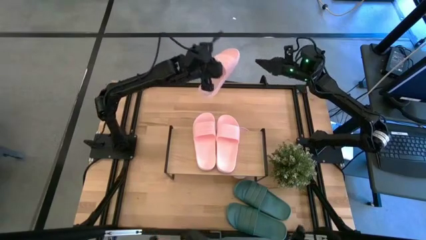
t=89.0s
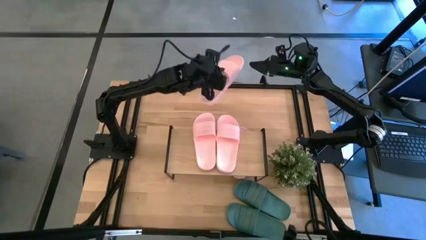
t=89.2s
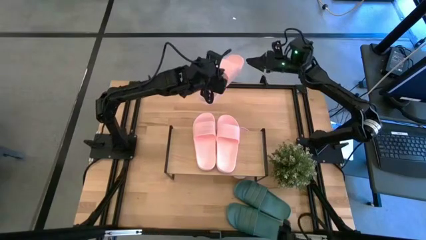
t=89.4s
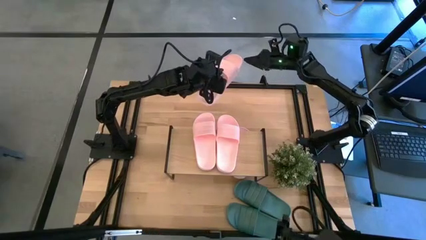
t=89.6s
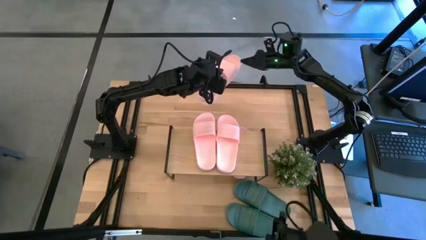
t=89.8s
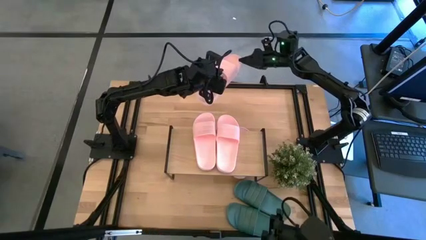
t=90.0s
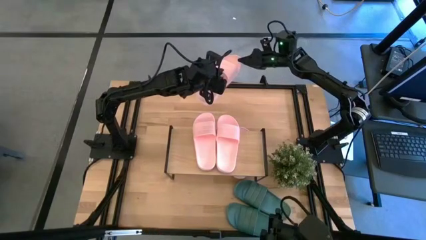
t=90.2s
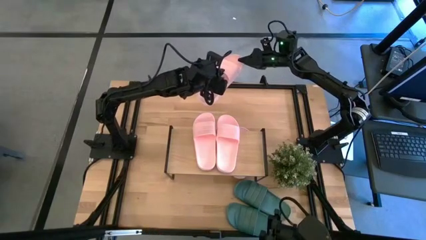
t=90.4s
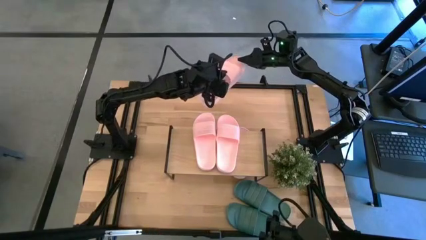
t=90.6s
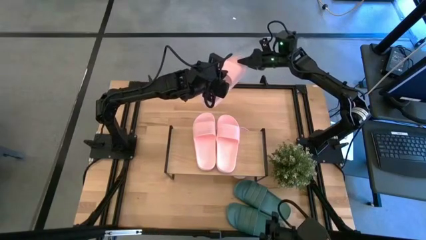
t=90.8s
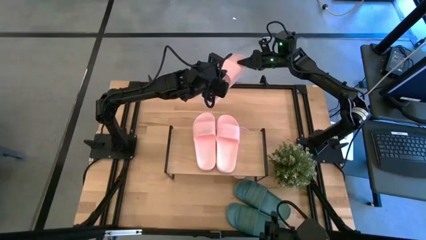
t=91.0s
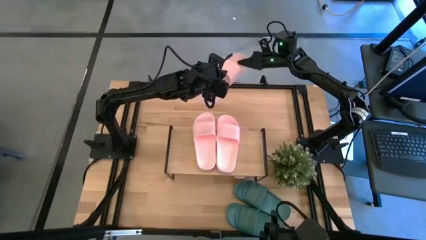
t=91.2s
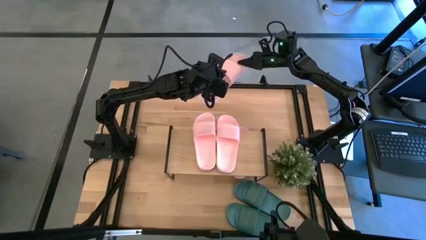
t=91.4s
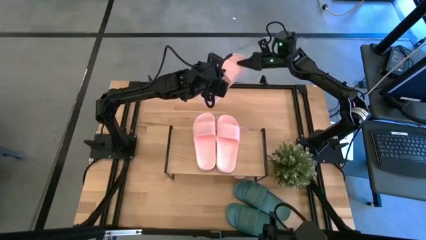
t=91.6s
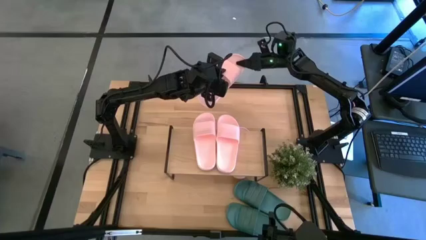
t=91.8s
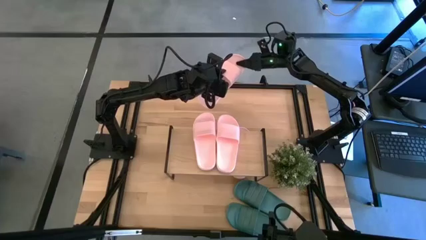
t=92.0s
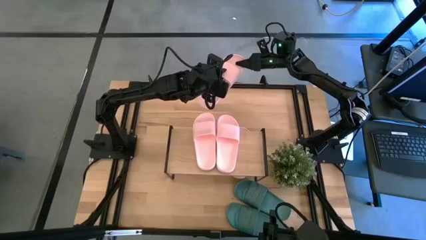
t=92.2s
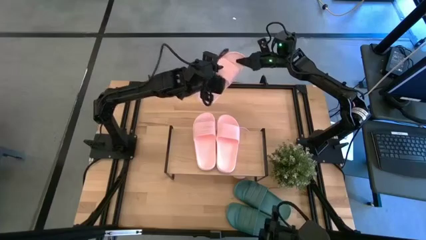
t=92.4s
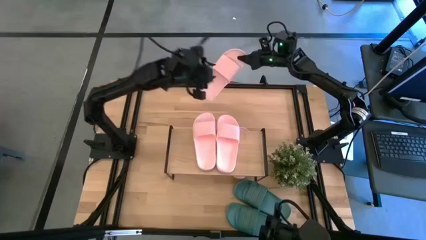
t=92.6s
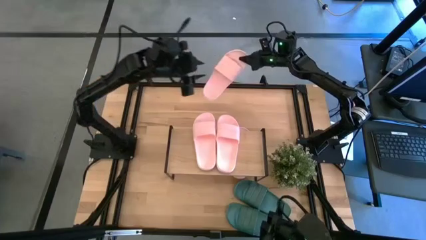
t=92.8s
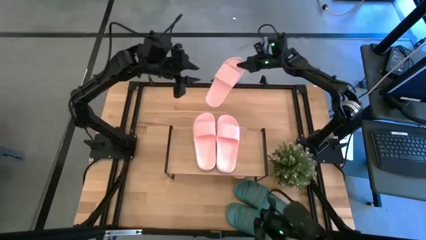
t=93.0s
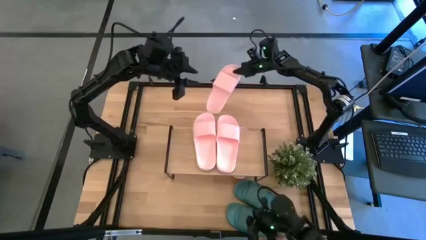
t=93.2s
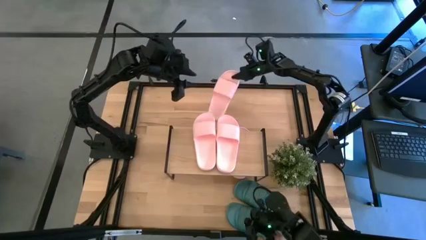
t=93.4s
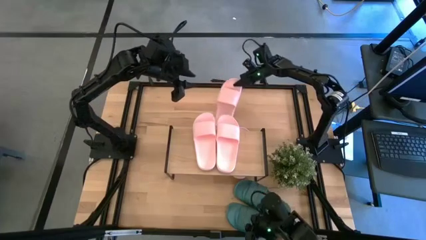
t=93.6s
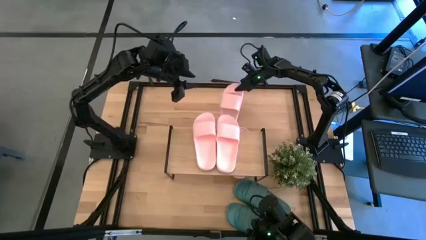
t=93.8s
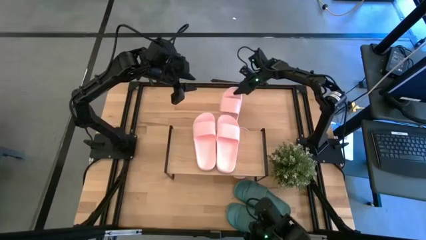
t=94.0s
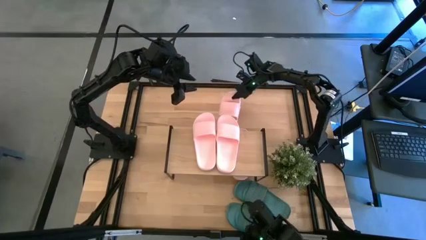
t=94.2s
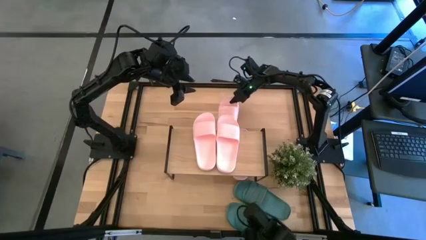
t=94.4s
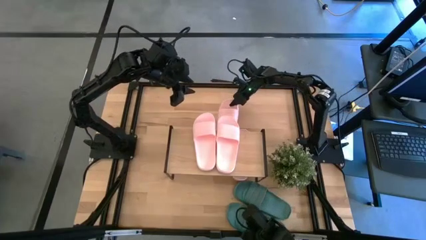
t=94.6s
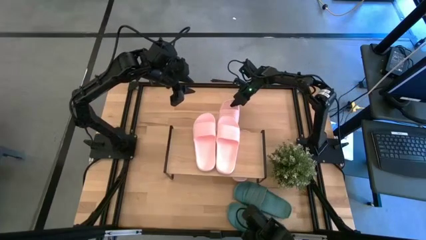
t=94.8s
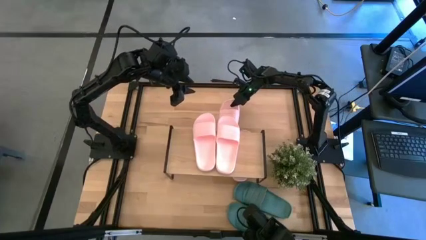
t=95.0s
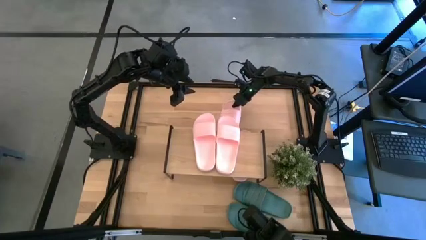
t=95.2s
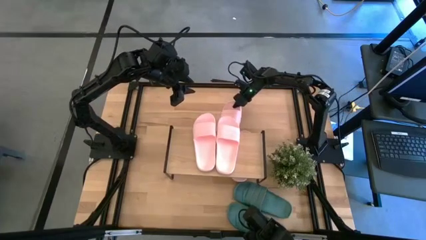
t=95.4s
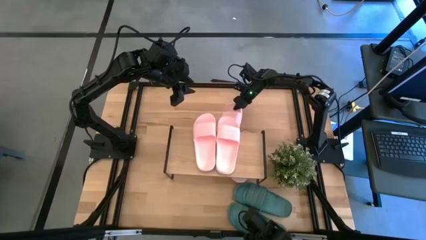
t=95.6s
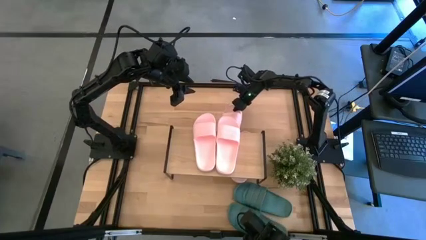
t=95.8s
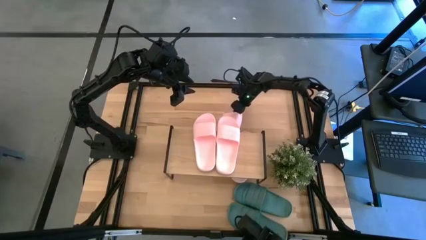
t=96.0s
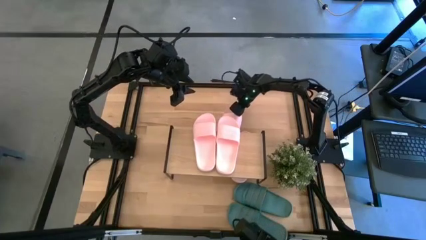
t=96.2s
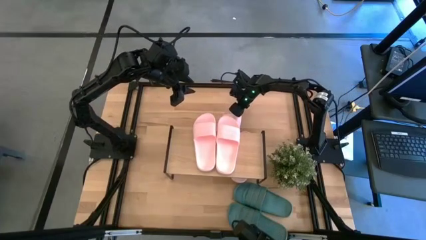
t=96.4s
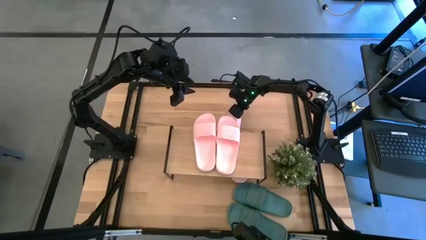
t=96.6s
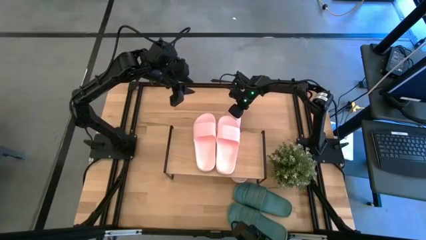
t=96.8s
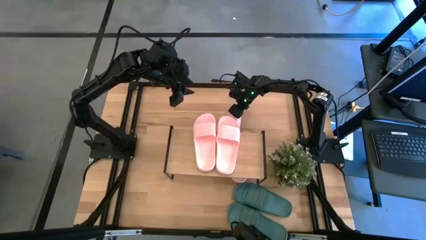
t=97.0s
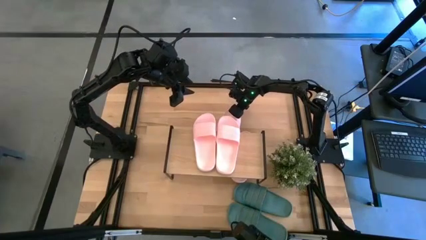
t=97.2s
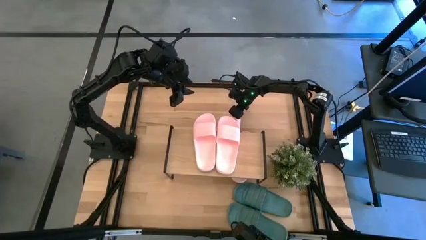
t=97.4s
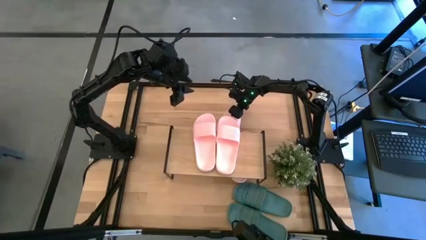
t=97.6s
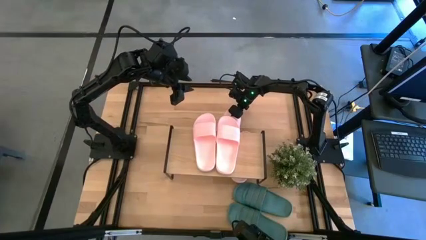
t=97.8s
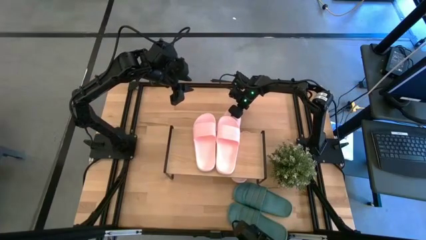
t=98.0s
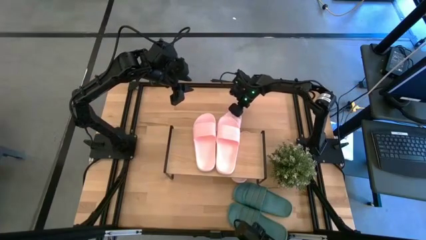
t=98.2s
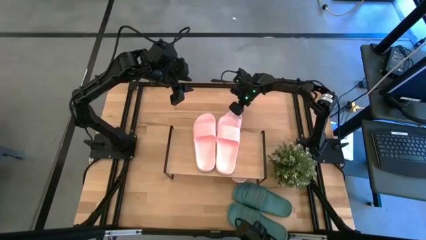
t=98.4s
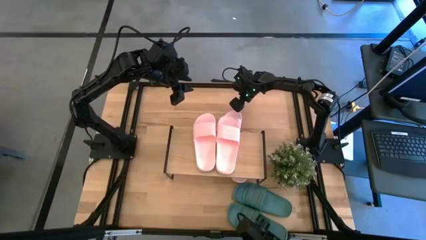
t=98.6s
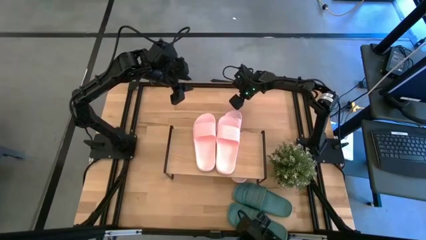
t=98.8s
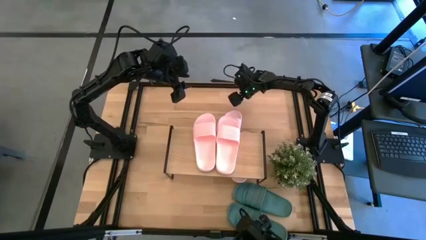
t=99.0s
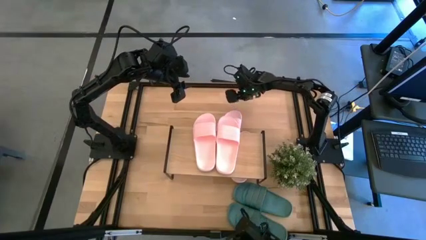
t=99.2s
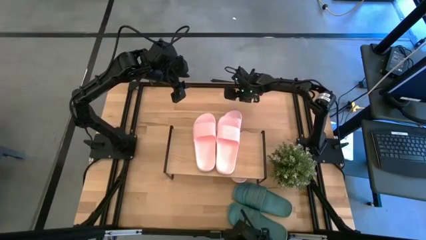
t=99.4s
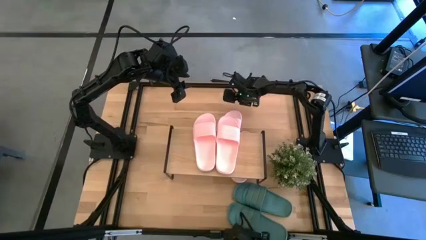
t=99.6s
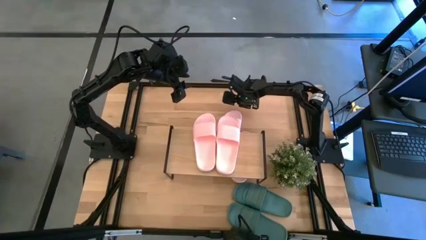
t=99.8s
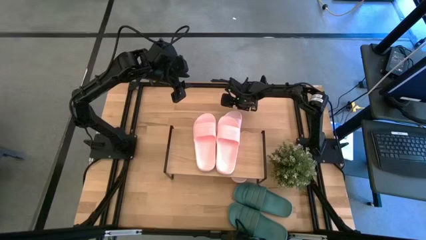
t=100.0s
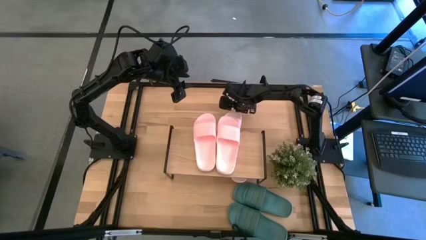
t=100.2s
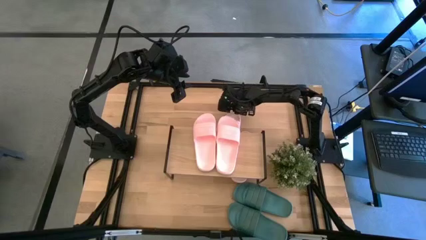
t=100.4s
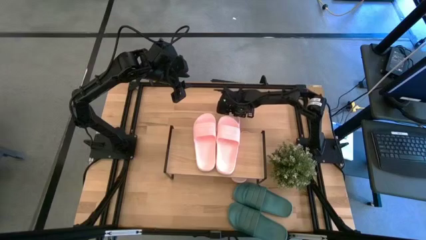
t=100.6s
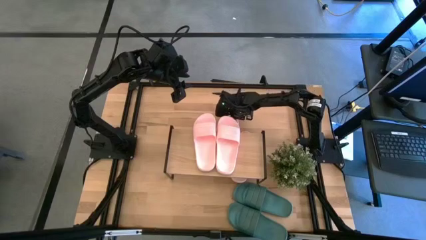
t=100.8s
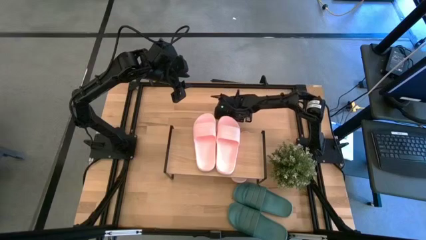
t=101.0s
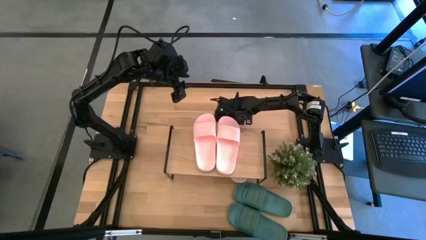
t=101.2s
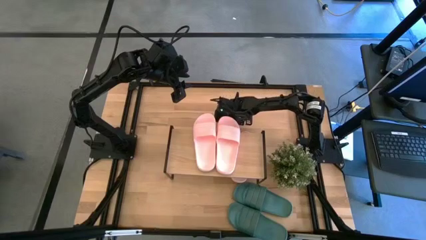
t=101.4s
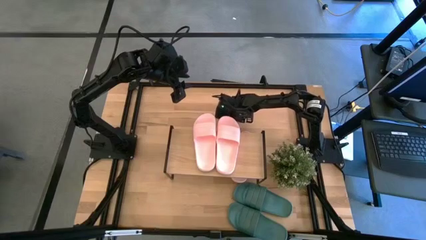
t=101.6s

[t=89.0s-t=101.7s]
Task: Pick and place slides into the shelf
Put the pink slipper under the shelf

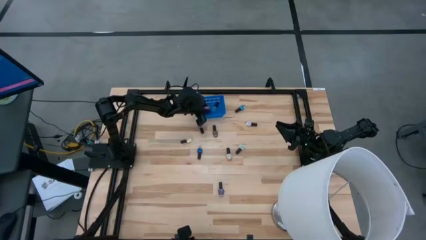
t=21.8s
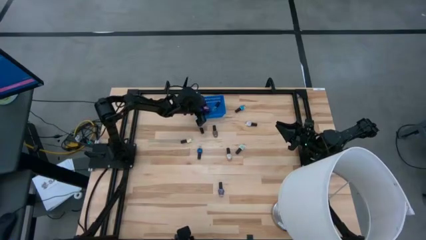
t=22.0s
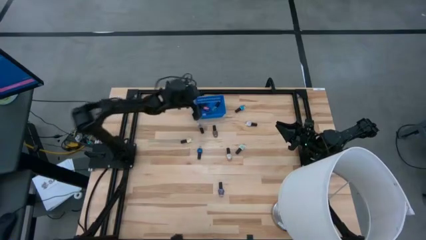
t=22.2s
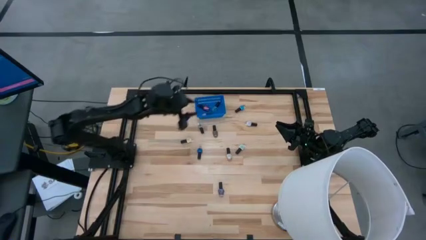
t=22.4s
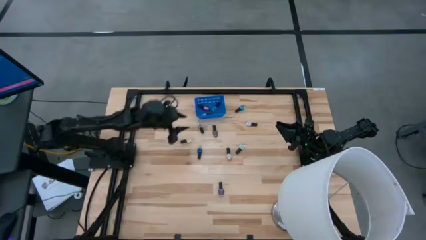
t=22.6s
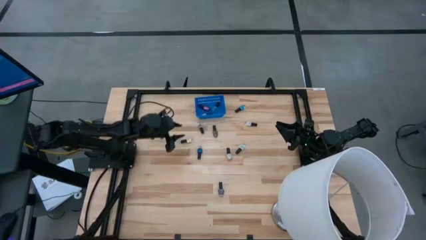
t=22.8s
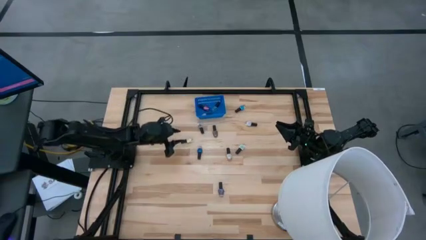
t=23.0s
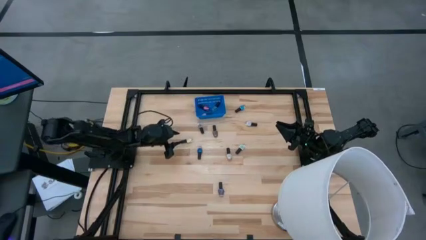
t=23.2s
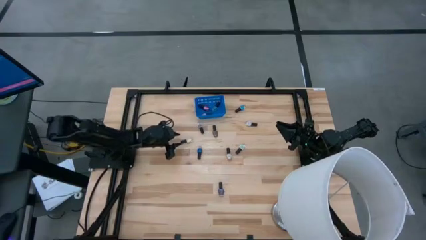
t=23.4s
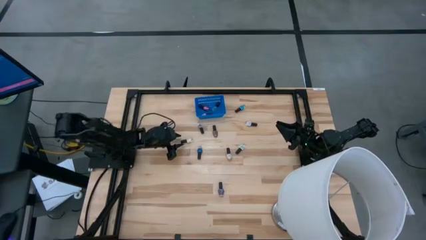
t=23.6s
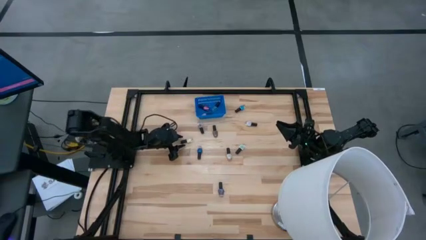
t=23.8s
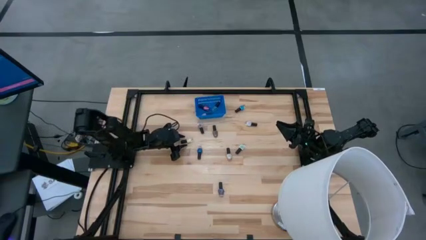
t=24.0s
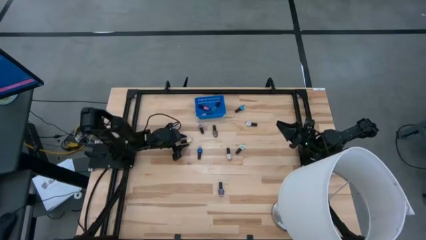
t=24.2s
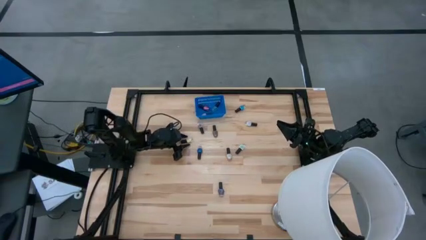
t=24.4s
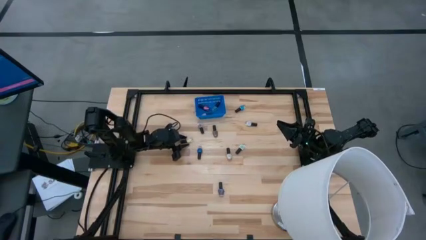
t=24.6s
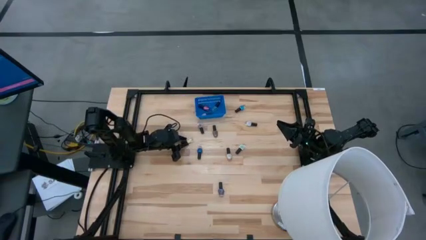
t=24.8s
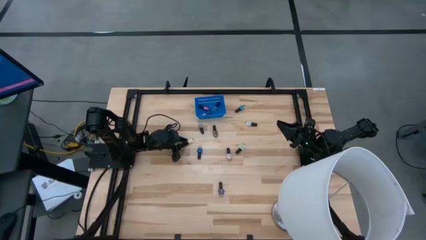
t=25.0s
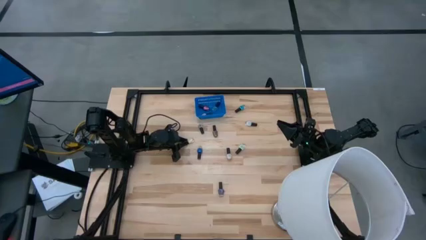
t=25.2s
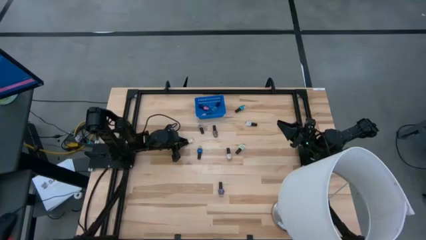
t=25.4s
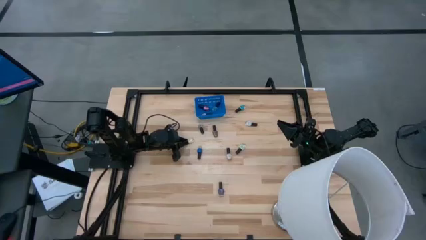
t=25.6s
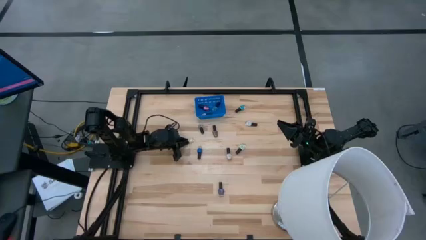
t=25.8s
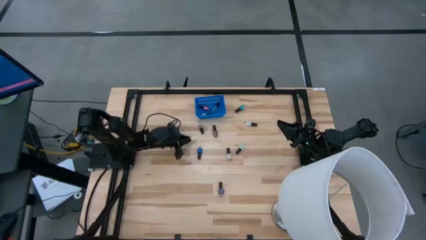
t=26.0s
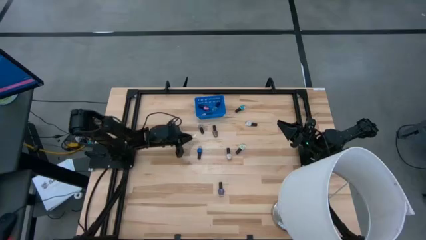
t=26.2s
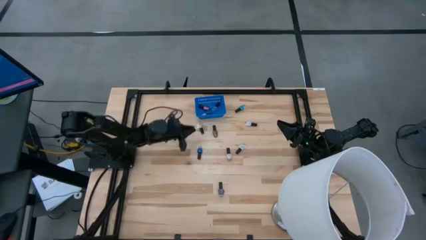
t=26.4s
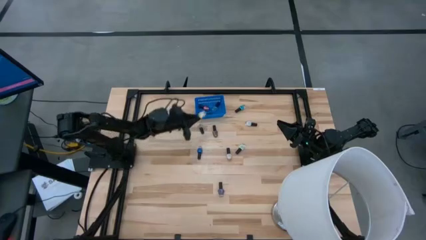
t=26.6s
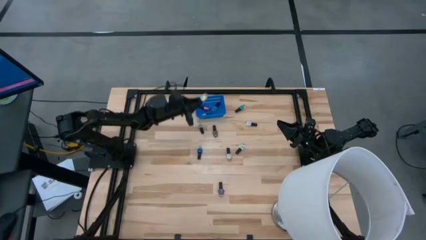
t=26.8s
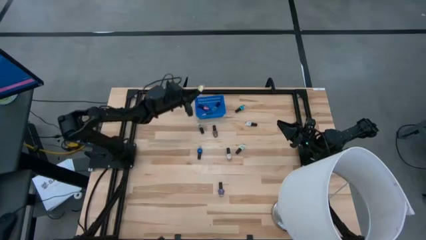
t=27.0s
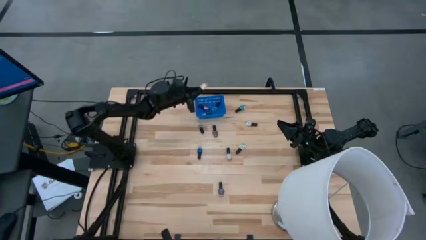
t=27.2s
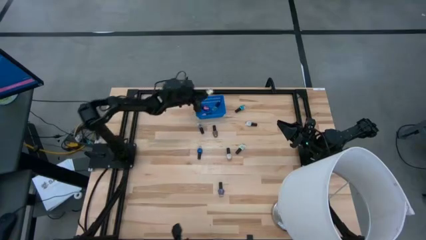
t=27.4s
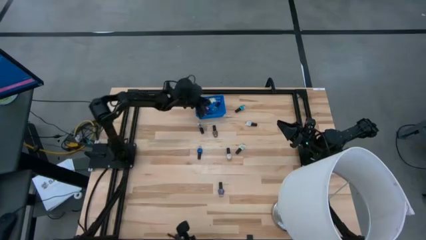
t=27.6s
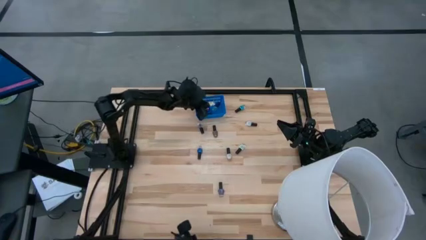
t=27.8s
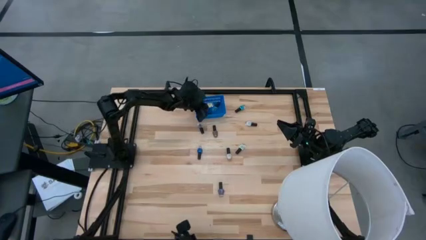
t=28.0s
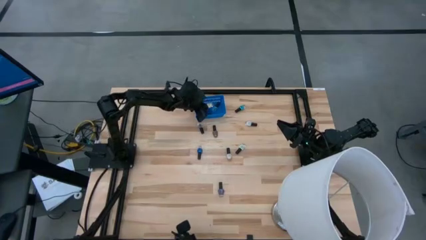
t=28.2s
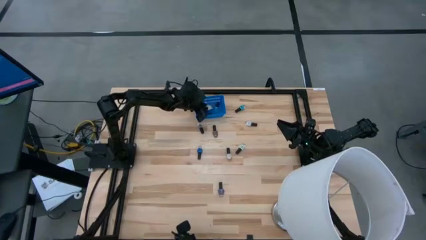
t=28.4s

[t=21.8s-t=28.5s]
Task: Pick & Place Nail Polish
Put the yellow nail polish bottle into the blue basket
